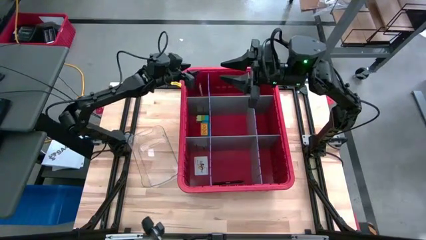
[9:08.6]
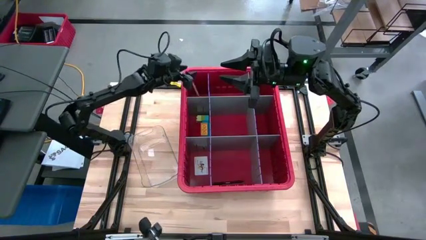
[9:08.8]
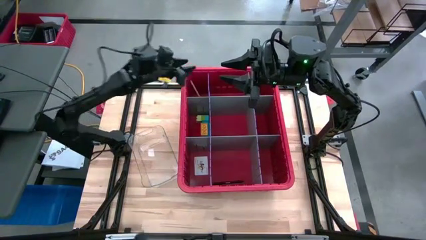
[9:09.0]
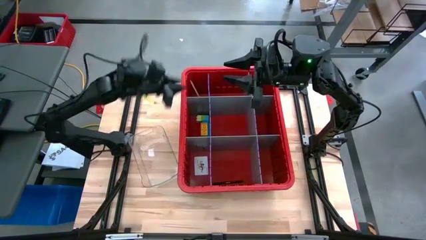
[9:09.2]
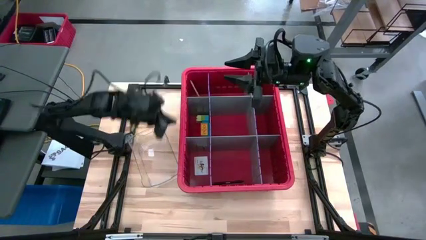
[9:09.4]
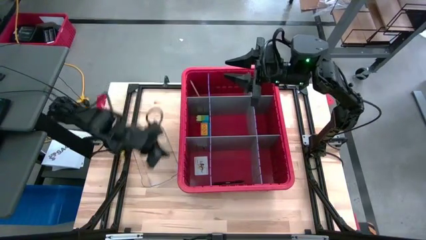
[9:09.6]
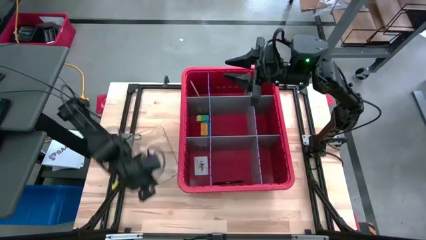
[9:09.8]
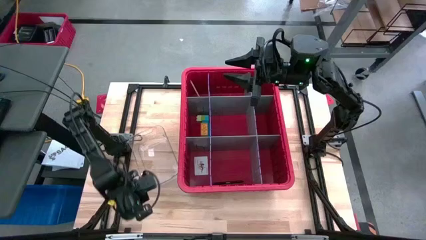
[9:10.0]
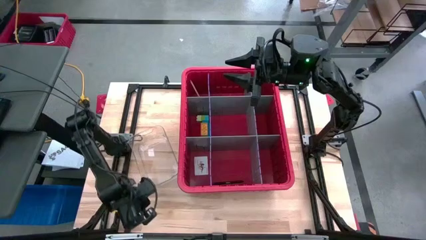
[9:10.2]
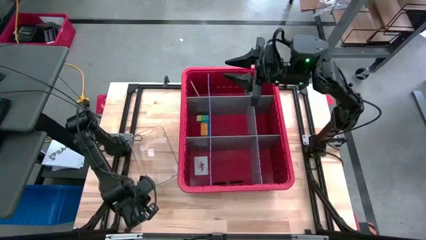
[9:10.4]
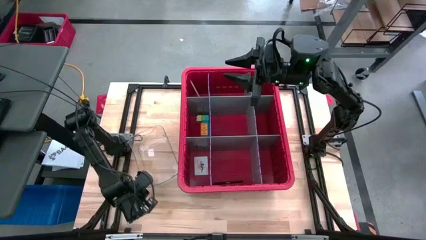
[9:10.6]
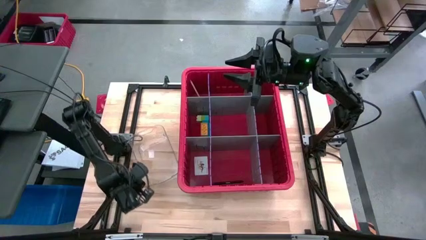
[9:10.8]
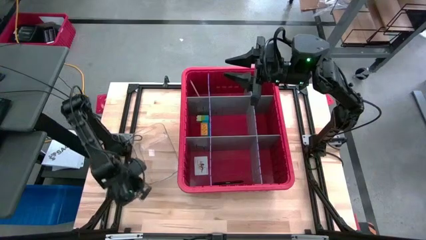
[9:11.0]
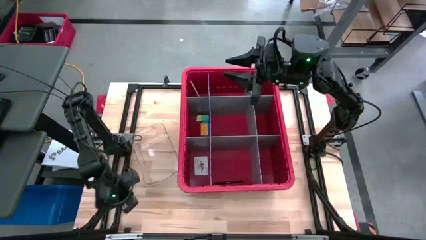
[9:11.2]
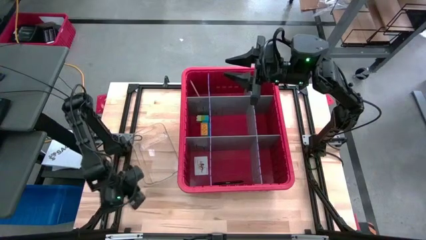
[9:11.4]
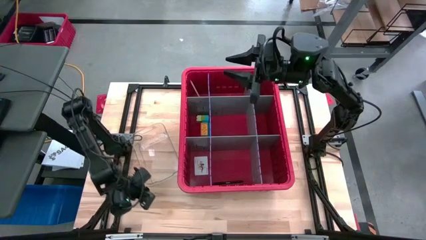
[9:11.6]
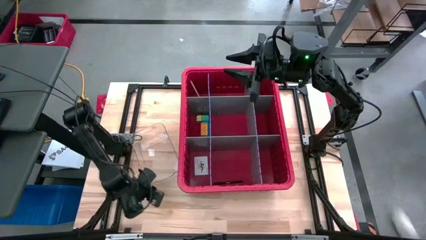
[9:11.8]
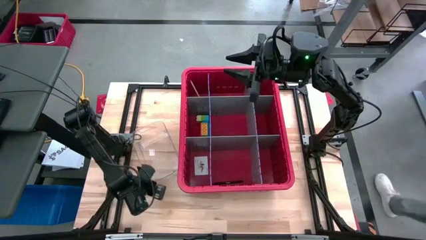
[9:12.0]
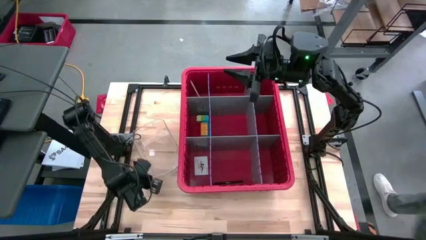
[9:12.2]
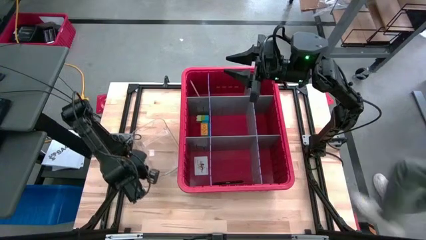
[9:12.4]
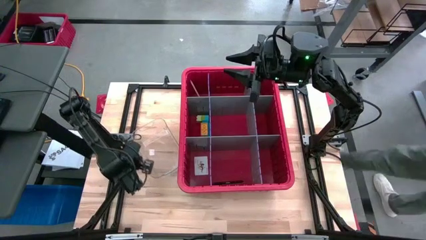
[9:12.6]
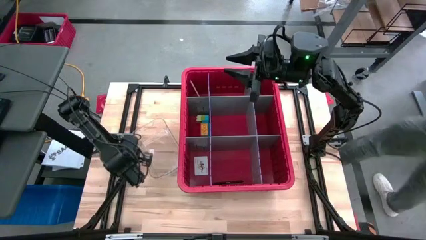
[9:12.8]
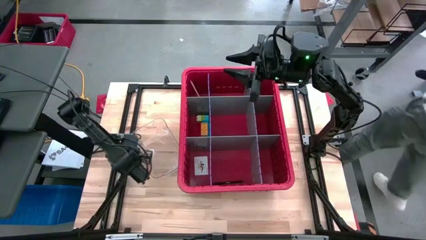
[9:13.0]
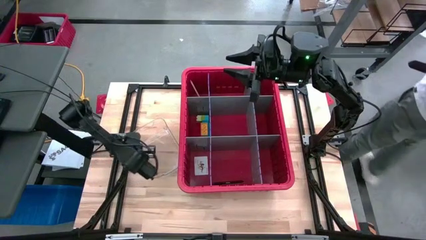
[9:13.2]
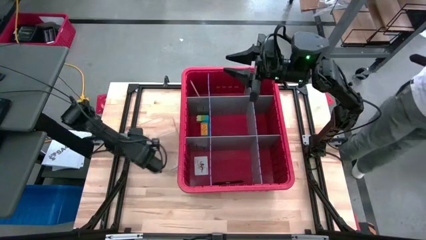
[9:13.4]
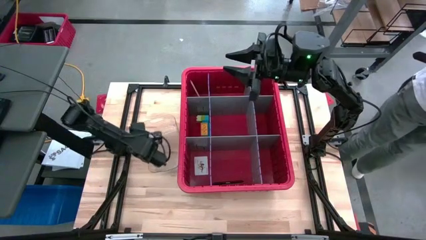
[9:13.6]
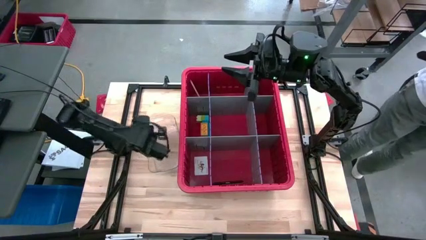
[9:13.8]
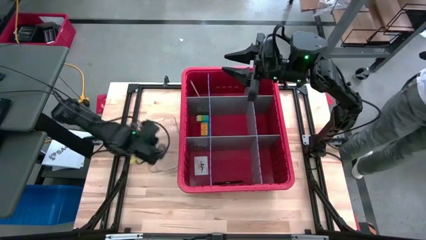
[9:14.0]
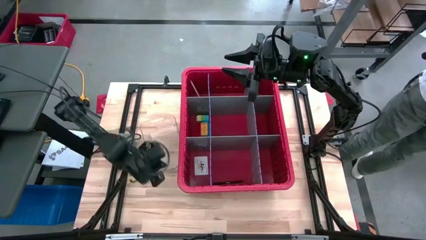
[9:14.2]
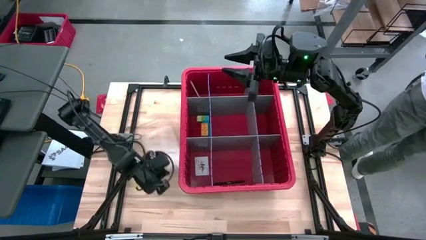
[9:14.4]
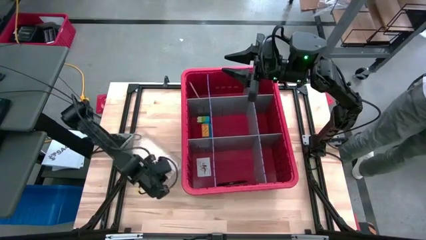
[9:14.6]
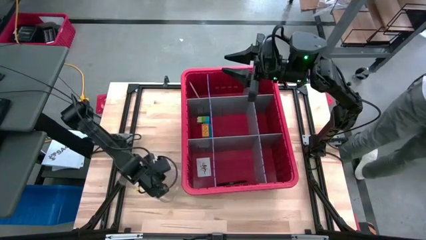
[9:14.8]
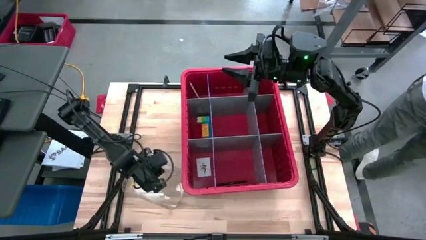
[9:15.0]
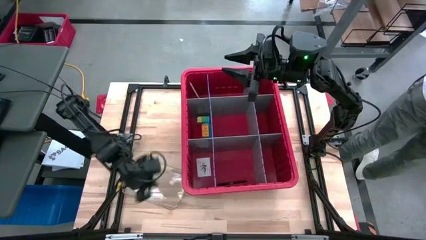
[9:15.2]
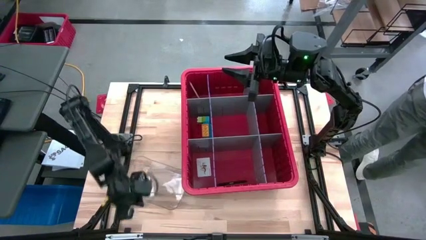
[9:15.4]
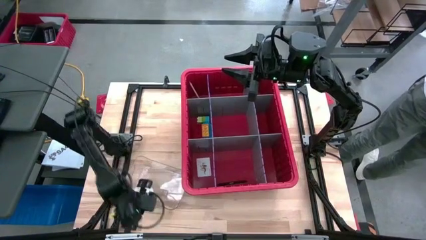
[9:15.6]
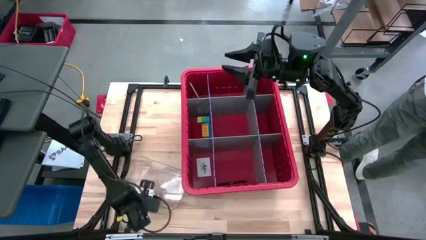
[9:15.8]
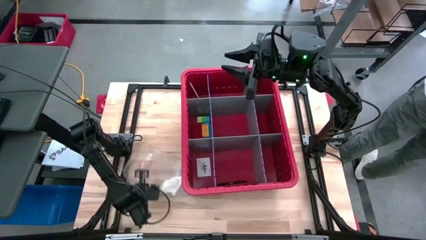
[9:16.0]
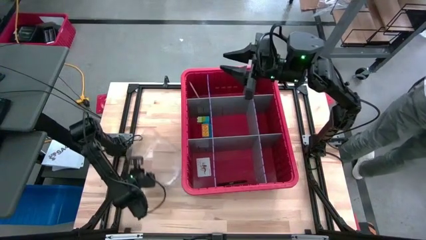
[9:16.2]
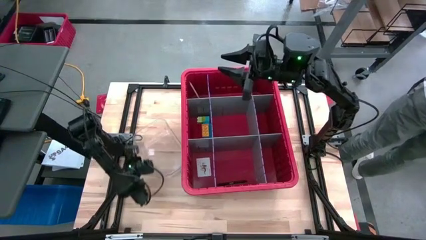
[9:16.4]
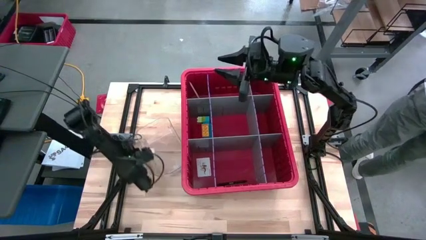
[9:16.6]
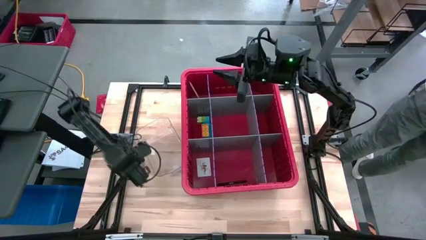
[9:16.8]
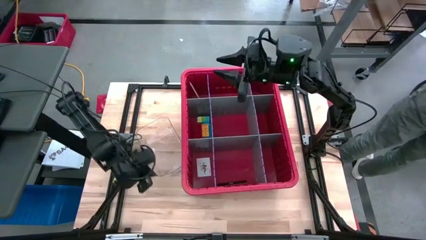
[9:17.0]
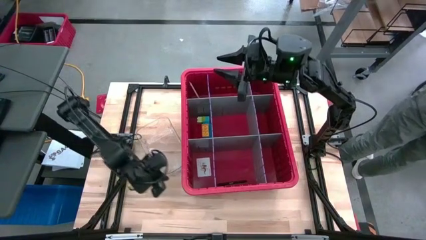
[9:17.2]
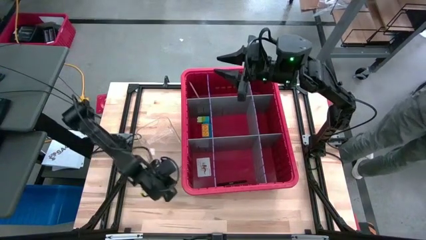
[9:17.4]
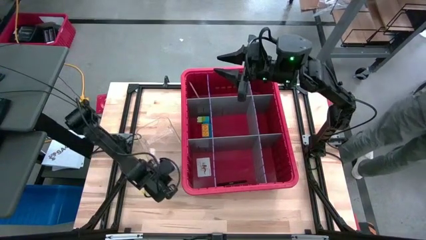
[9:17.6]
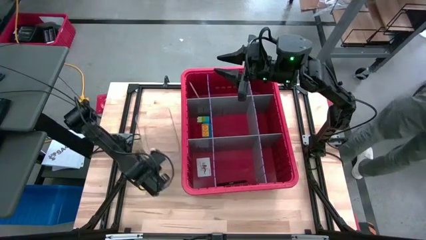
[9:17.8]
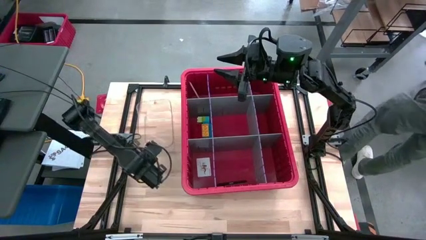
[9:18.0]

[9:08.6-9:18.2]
Task: Sort blocks
Move the transparent bin to the top left

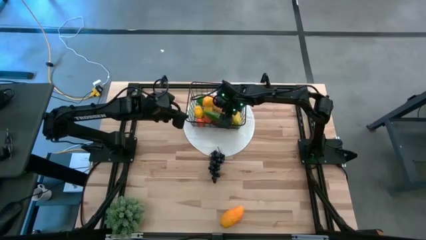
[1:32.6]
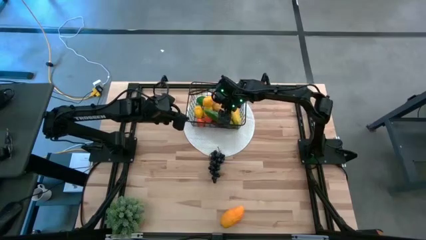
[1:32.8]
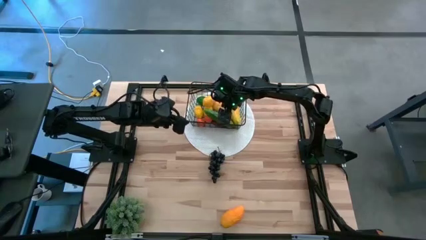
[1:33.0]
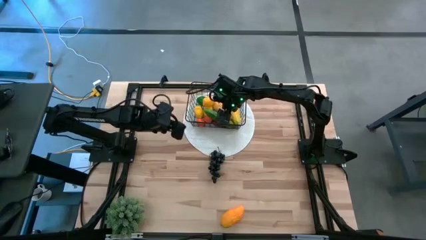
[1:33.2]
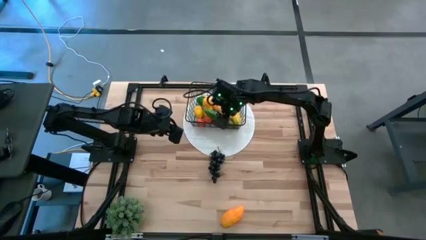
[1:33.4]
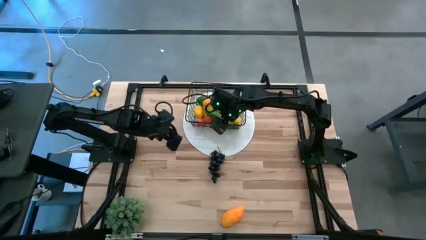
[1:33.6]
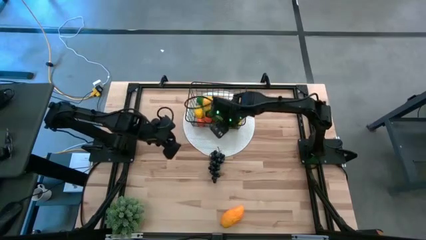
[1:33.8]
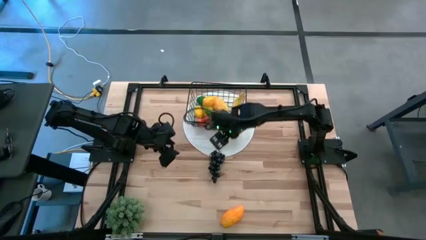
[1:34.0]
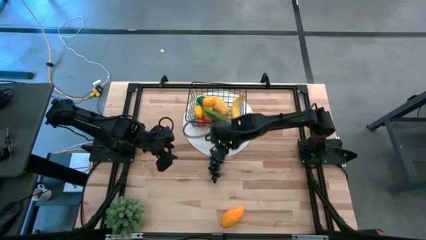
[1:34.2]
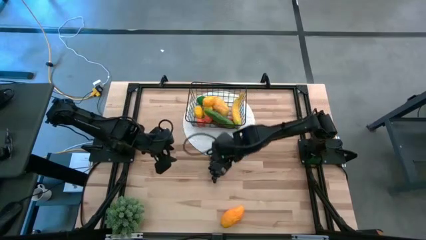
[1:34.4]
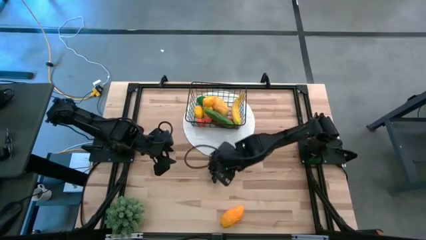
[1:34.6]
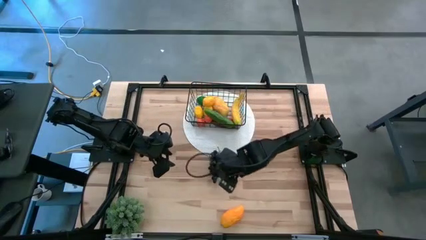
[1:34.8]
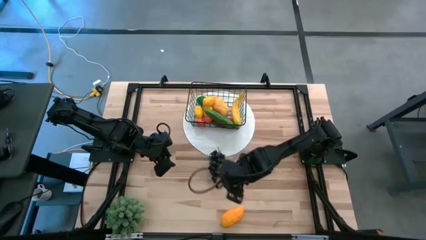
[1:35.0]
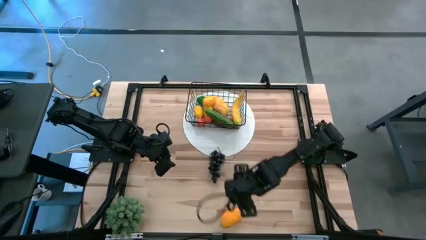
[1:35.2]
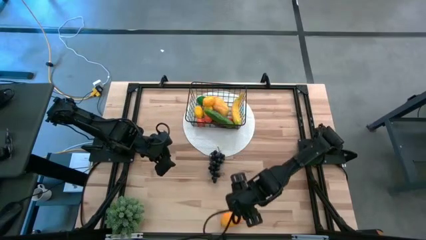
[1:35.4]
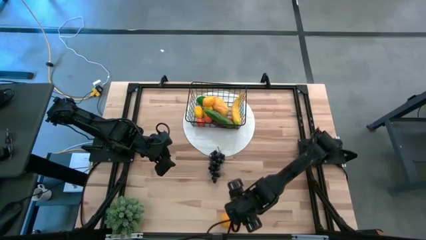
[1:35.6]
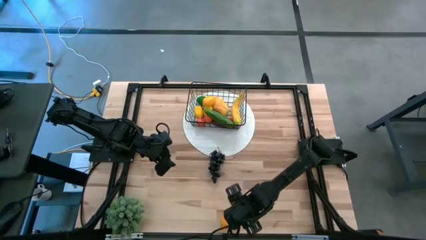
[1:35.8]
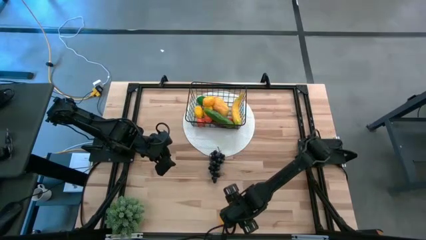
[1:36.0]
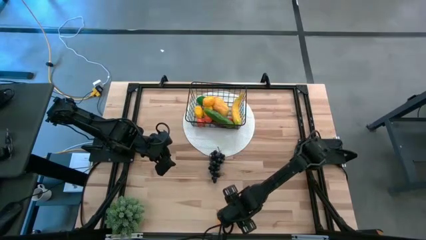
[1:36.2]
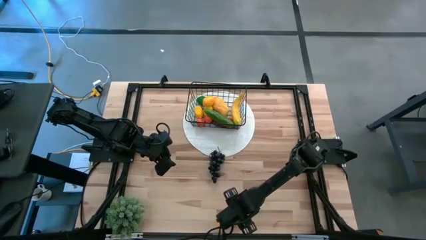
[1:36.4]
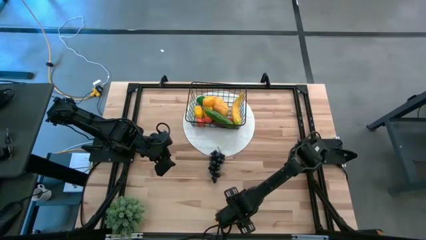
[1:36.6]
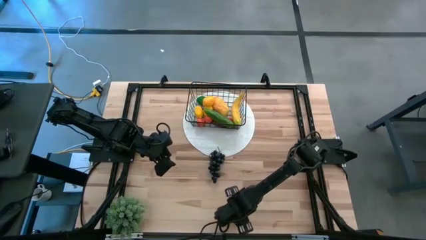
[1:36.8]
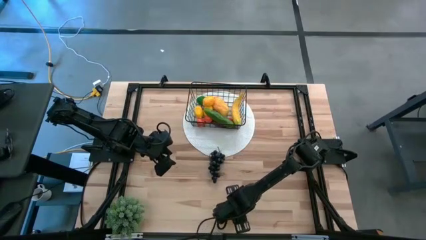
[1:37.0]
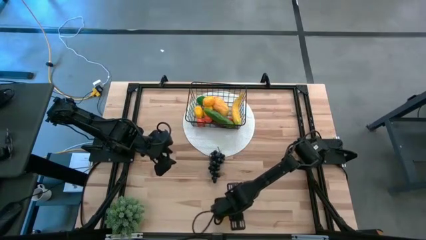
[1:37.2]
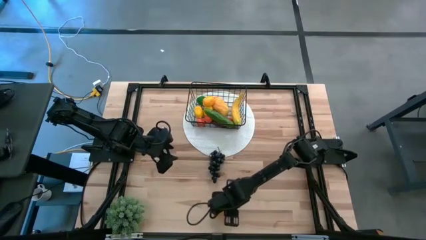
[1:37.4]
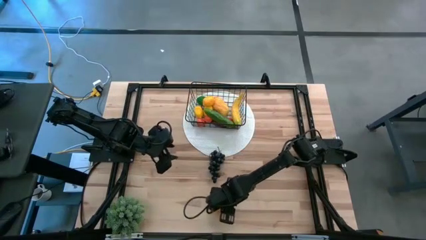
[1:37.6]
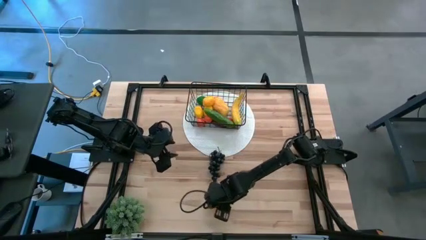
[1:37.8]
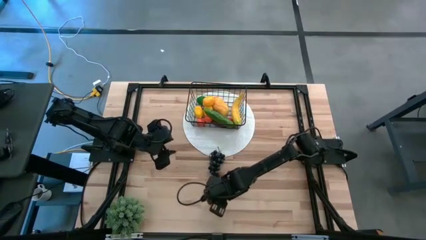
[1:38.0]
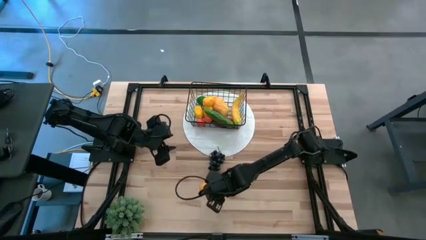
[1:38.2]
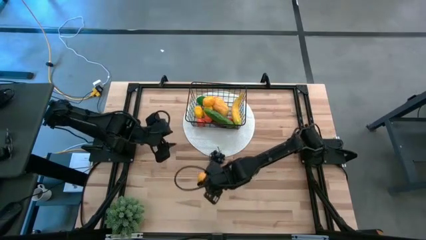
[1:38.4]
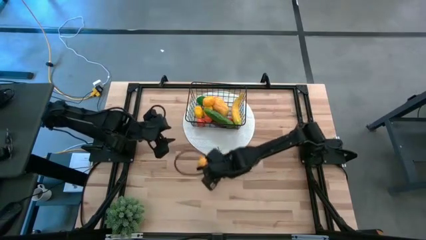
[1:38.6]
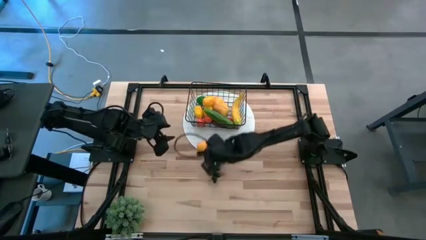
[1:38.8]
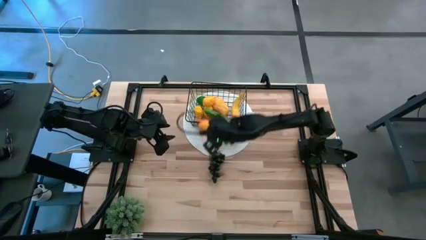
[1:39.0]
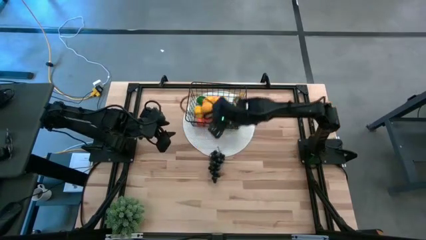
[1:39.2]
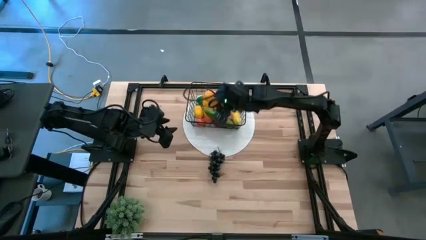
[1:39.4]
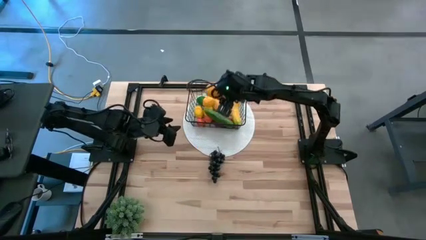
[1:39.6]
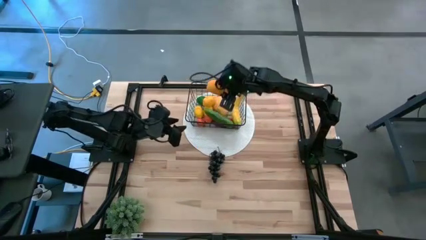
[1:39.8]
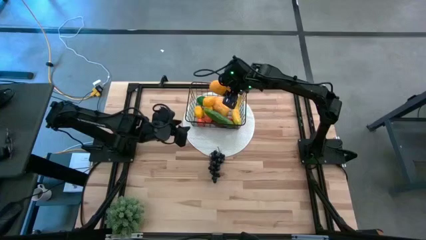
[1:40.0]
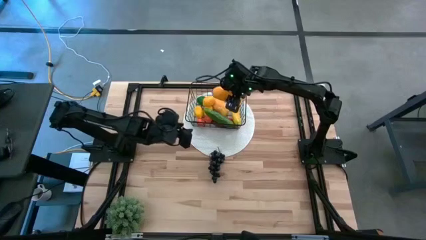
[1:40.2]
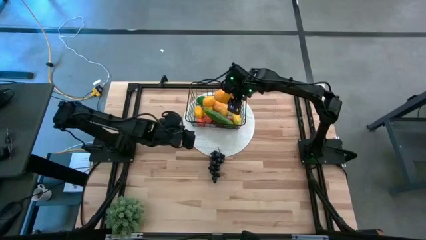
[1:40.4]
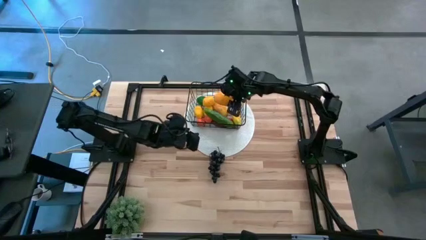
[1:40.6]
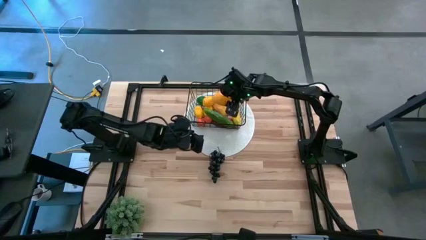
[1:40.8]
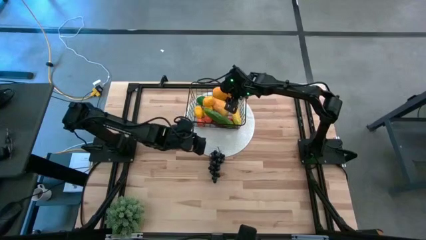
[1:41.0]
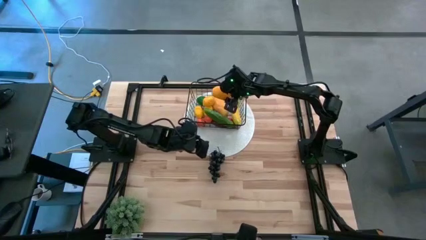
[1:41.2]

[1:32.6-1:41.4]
Task: Build produce basket
Put the yellow mango into the black wire basket
